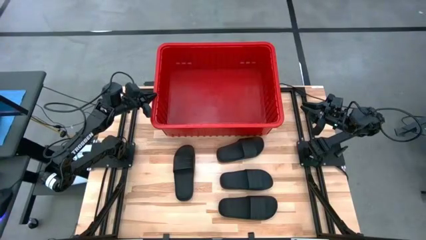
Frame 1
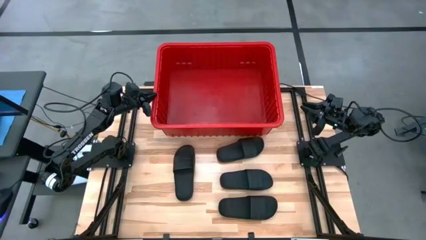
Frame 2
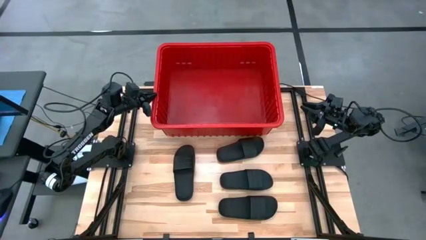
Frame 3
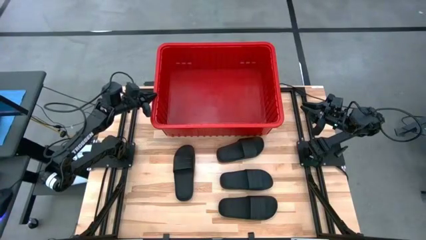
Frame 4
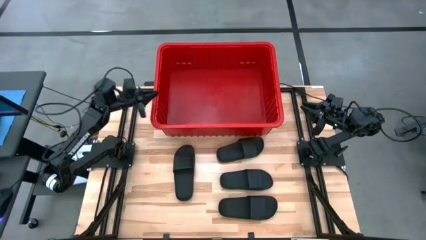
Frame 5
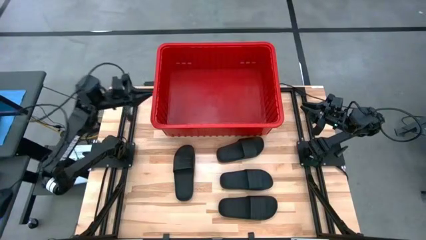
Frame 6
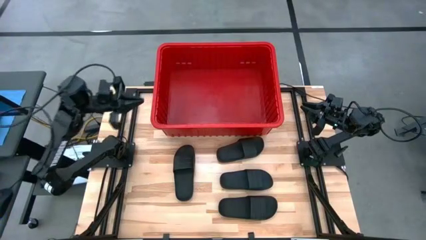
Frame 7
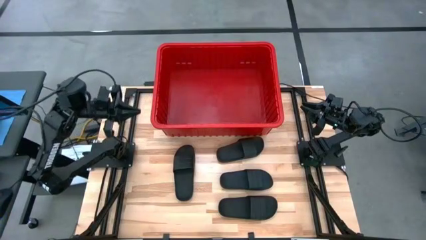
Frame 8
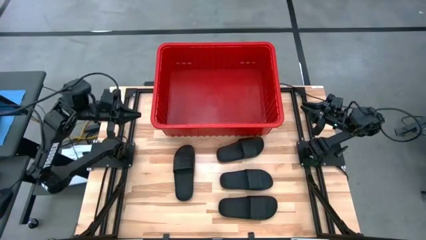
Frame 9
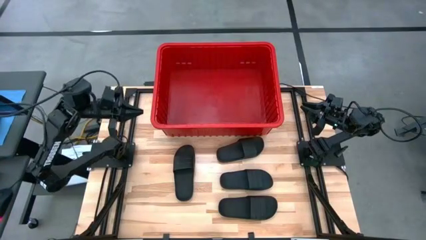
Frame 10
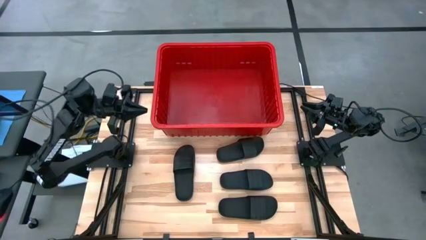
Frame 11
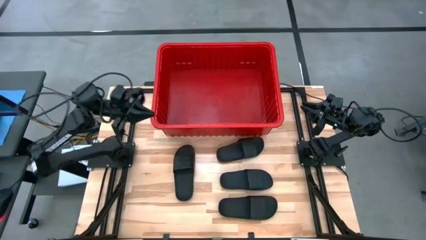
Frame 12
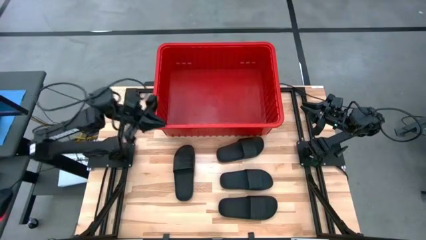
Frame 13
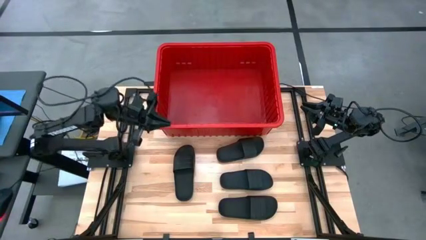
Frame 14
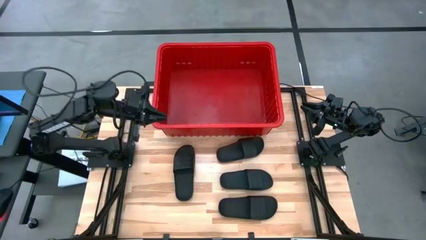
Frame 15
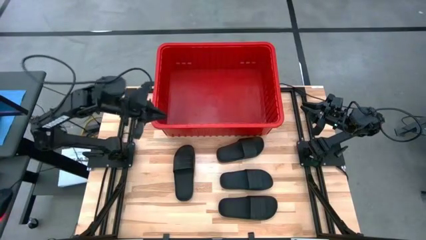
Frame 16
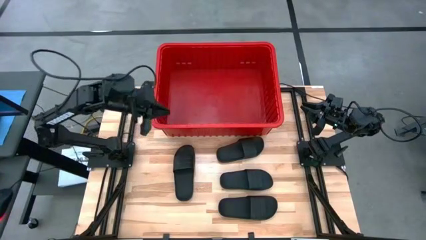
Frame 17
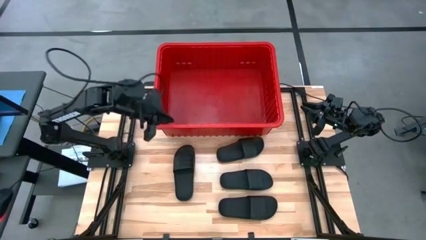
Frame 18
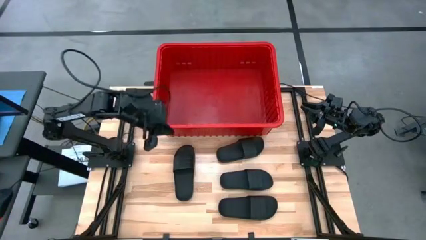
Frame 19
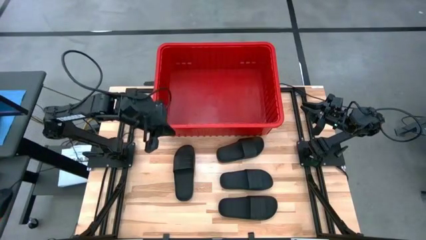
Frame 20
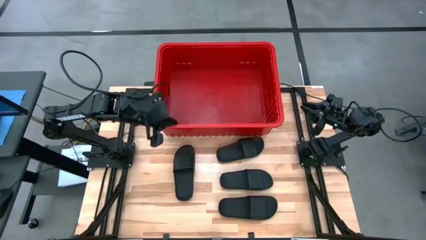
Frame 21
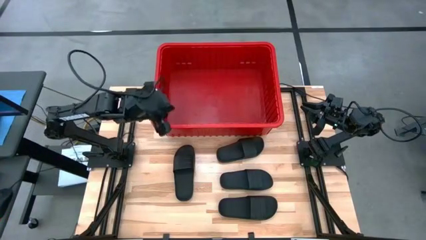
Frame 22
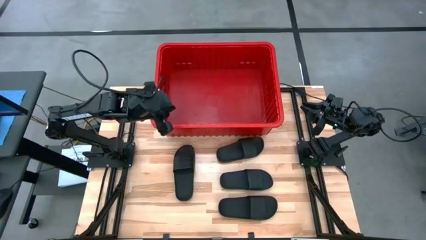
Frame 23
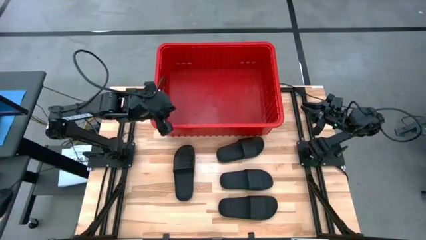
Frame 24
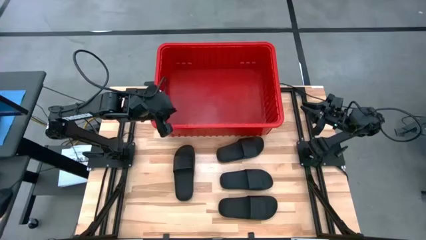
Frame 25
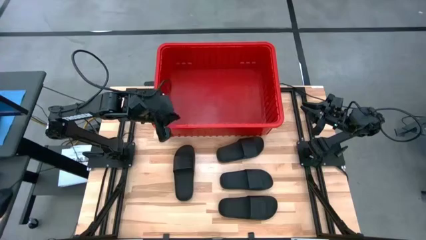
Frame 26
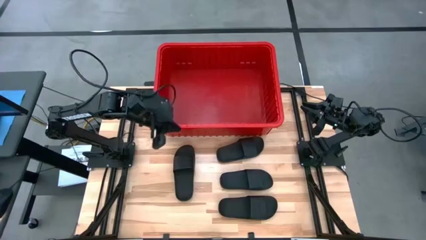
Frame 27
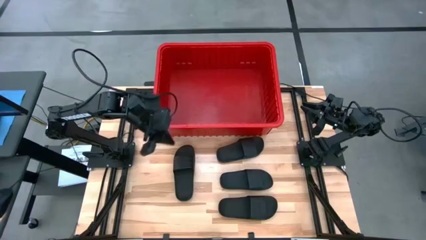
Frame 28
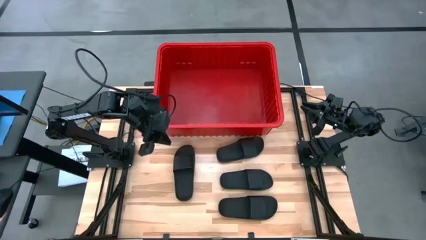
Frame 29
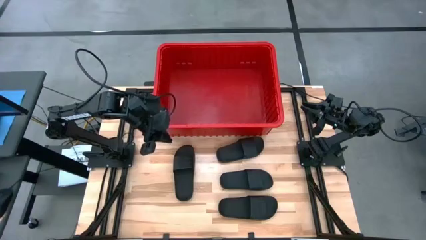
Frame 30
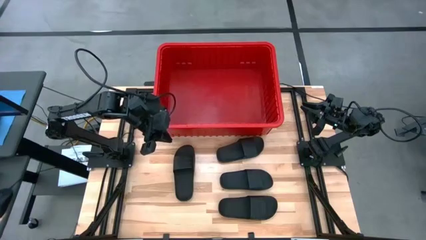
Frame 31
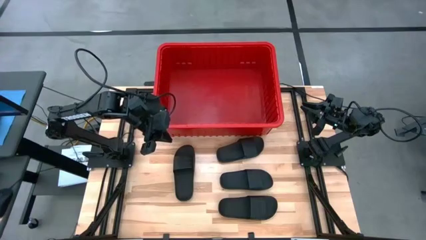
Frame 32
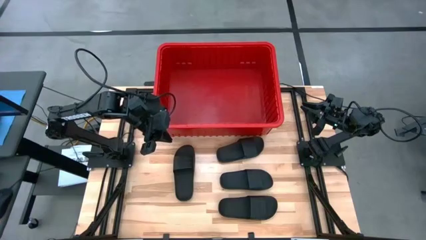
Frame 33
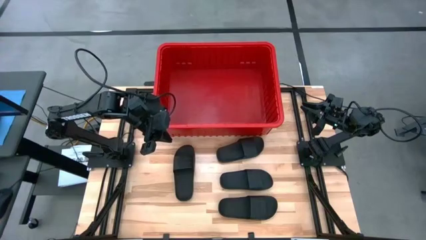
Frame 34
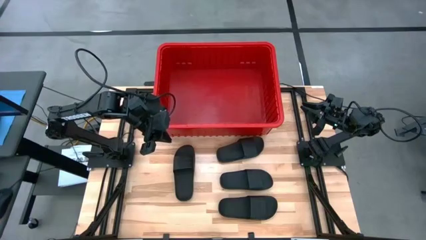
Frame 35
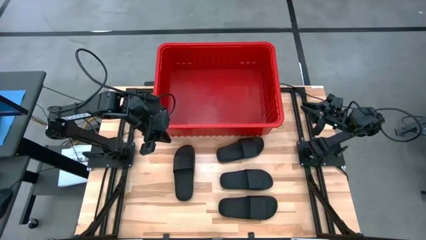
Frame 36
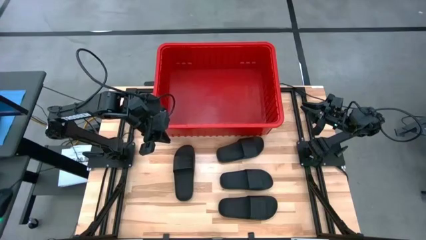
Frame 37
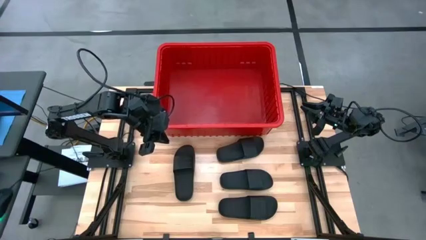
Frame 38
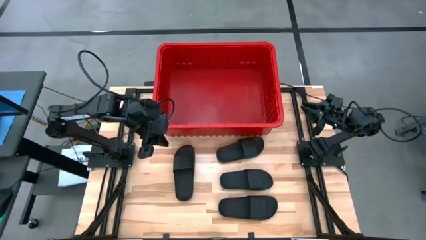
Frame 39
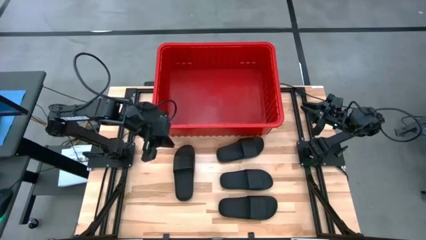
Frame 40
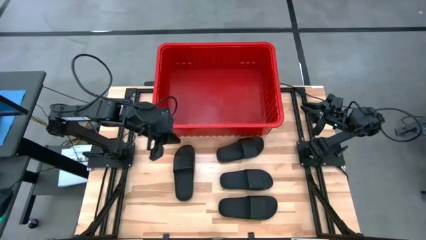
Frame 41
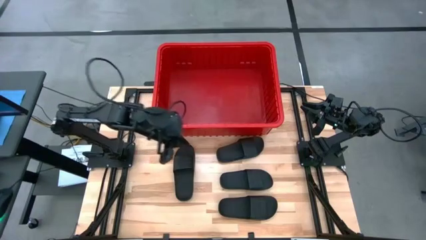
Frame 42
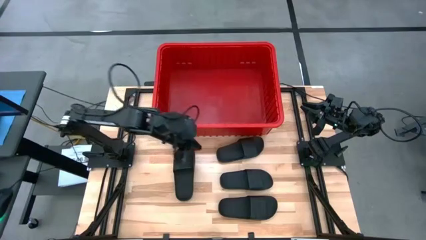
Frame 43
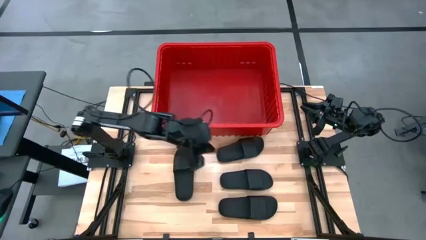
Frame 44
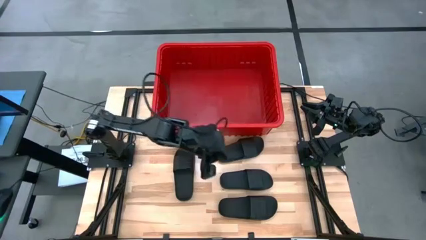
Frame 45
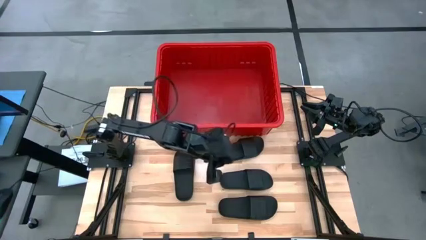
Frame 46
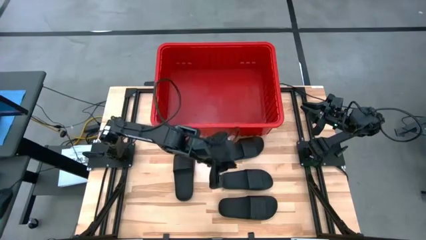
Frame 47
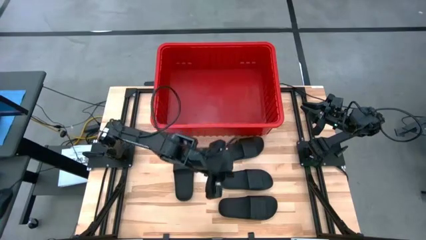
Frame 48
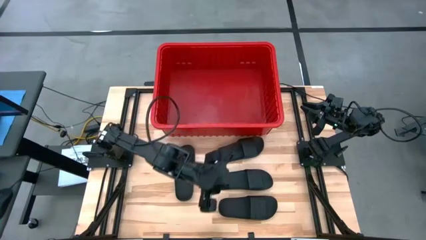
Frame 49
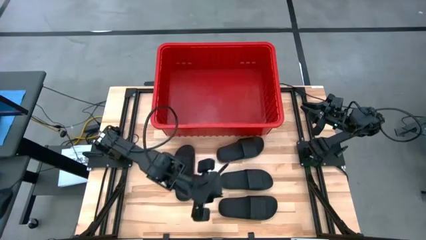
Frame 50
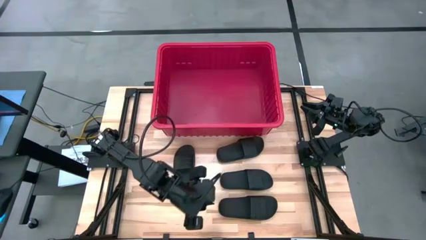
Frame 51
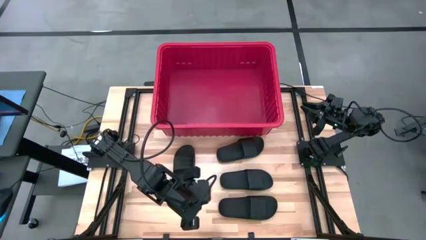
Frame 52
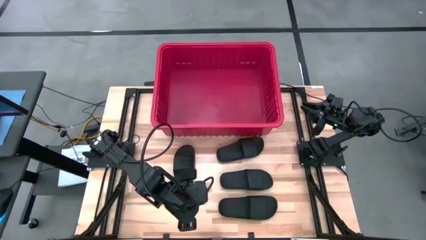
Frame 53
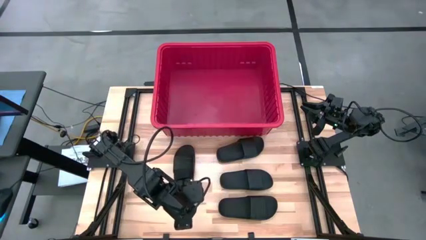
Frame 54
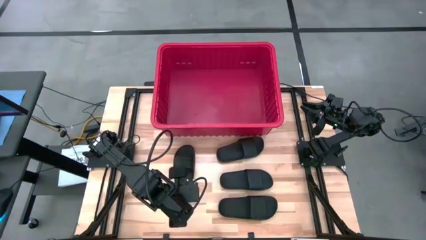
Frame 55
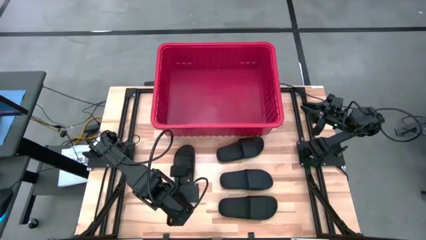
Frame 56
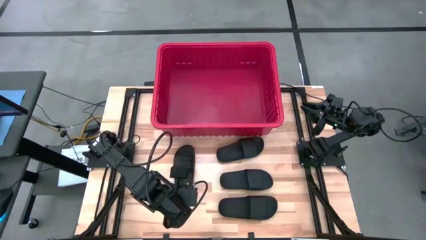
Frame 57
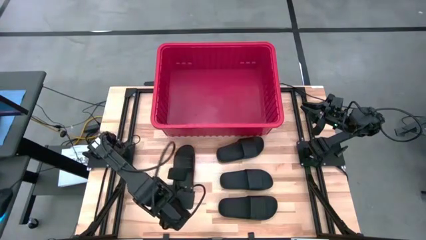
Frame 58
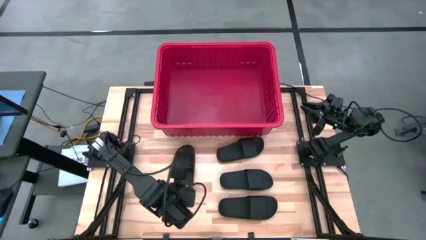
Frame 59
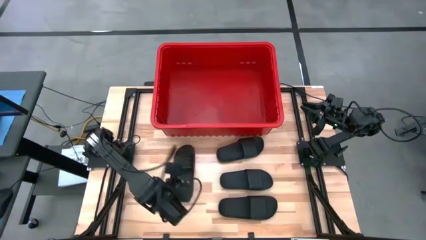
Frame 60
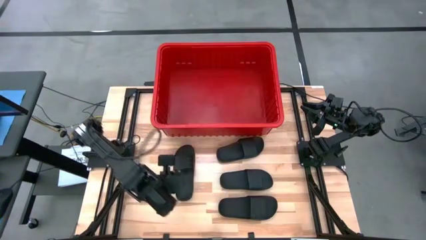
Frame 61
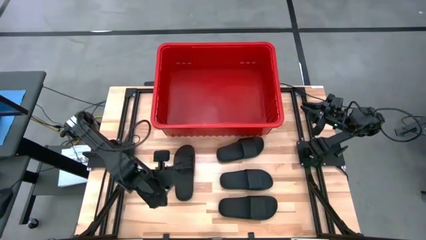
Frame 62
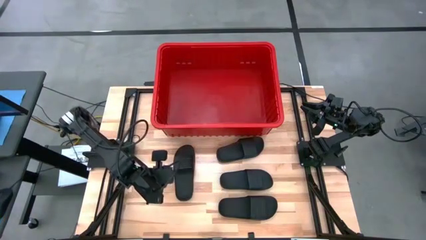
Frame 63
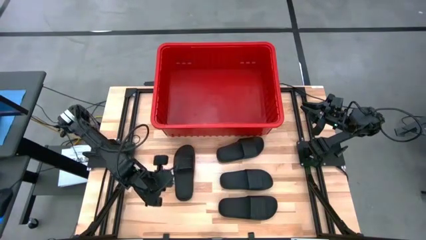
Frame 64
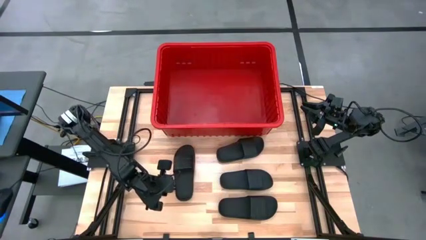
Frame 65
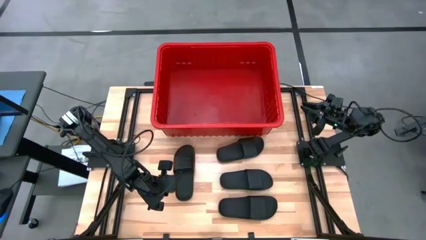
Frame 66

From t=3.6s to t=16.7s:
Task: Pick and place slides into bin
Put the black slide into the red bin
